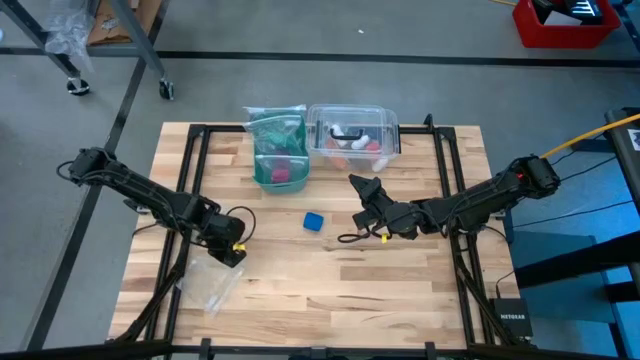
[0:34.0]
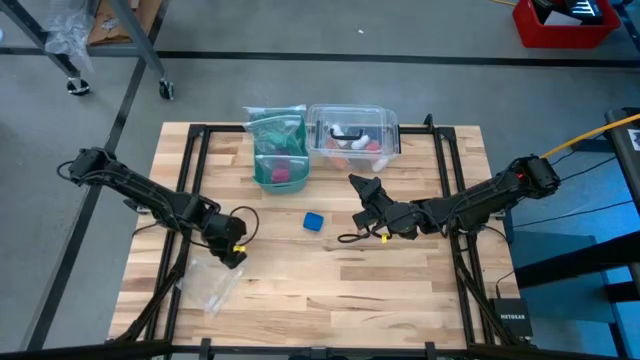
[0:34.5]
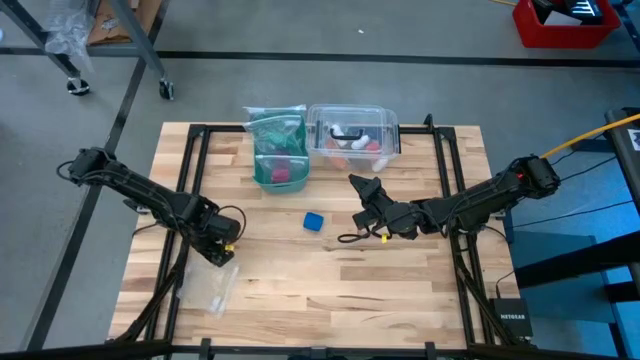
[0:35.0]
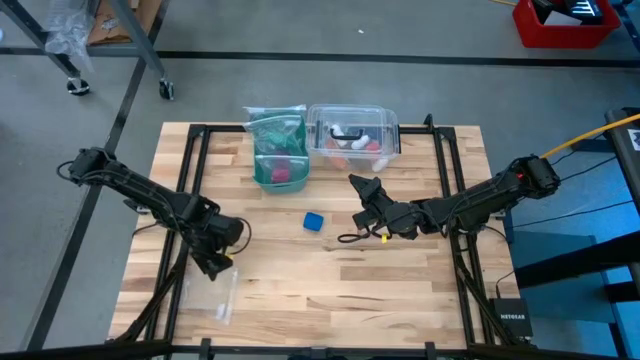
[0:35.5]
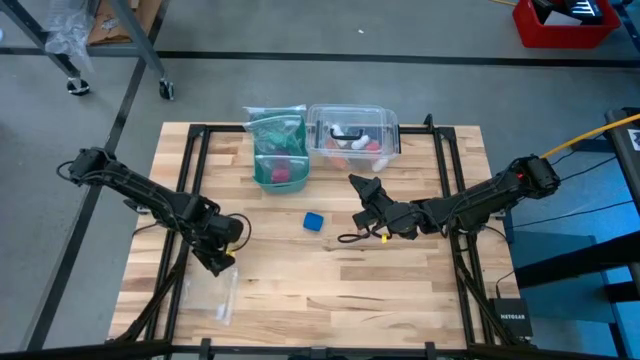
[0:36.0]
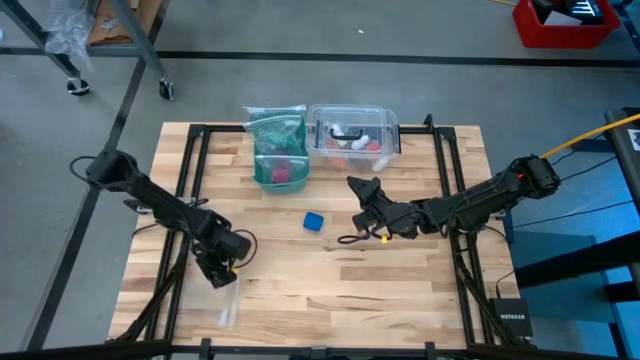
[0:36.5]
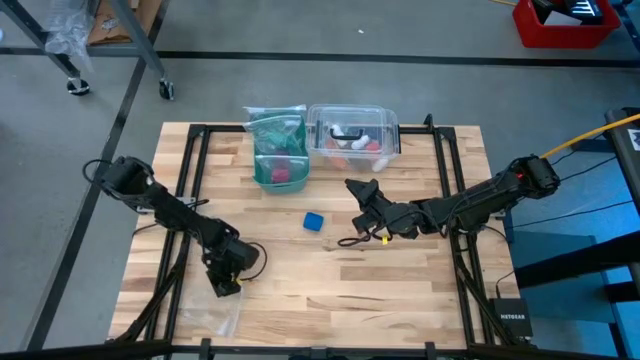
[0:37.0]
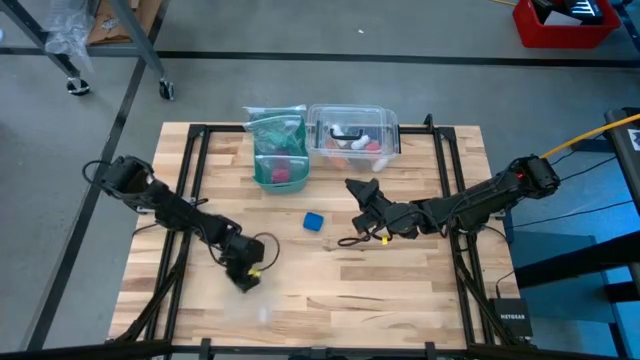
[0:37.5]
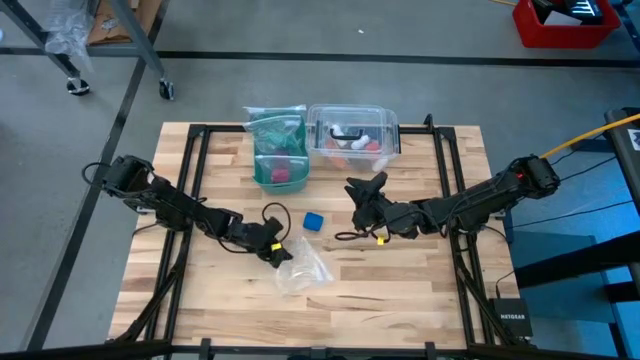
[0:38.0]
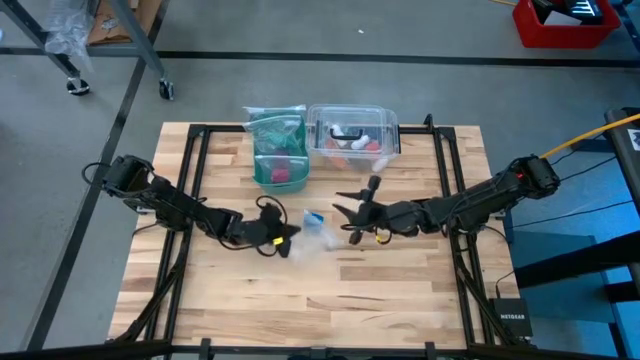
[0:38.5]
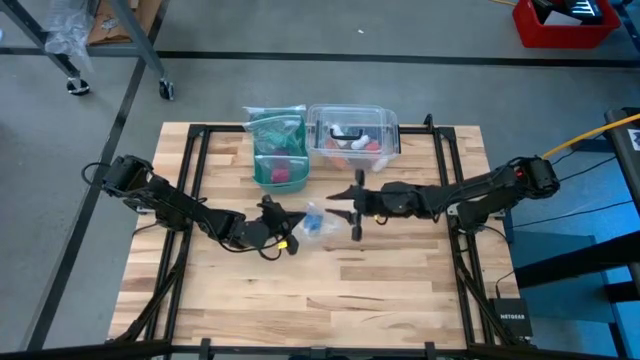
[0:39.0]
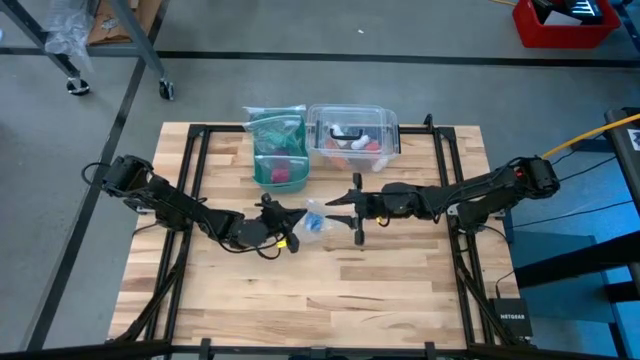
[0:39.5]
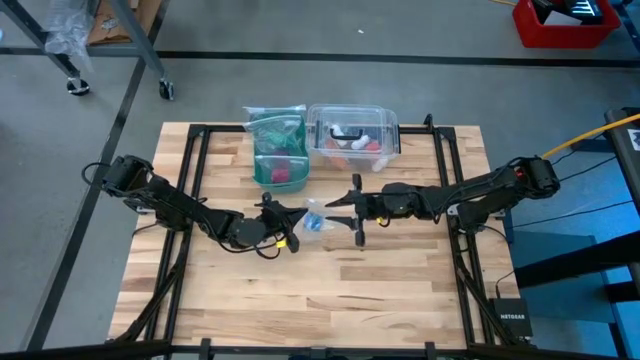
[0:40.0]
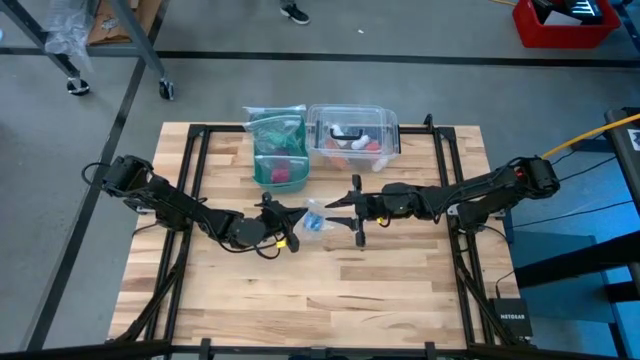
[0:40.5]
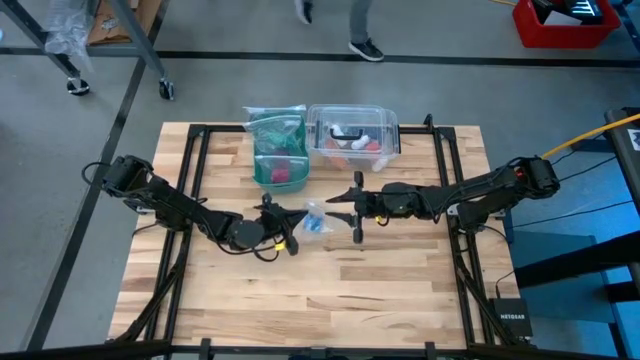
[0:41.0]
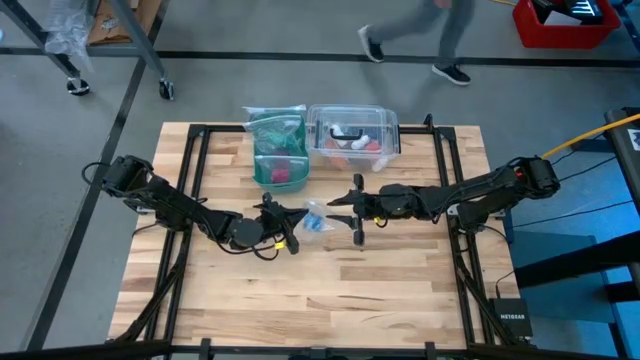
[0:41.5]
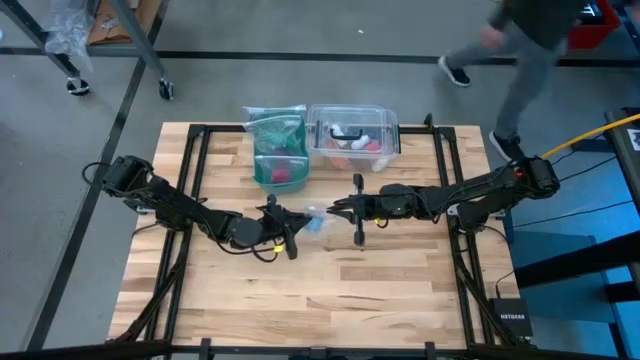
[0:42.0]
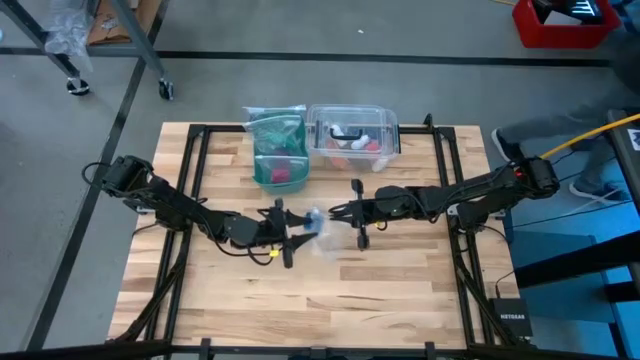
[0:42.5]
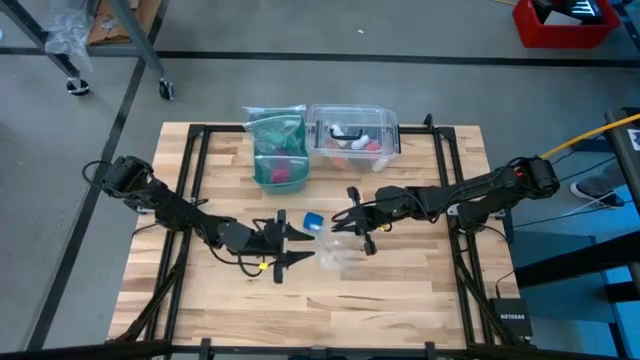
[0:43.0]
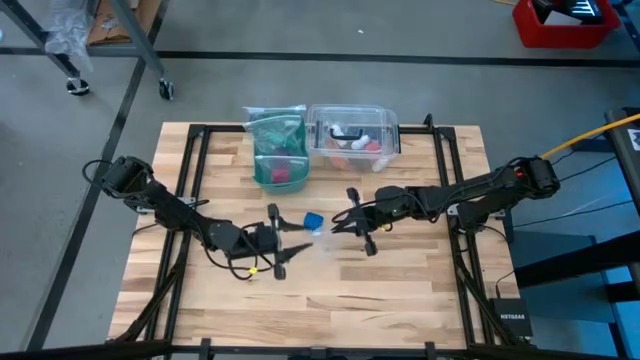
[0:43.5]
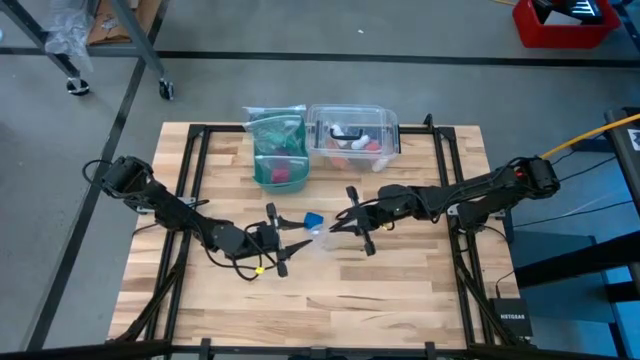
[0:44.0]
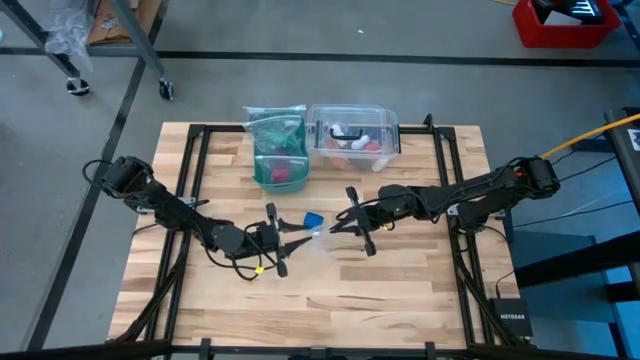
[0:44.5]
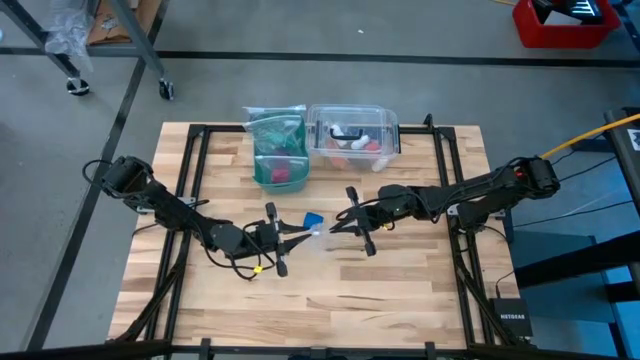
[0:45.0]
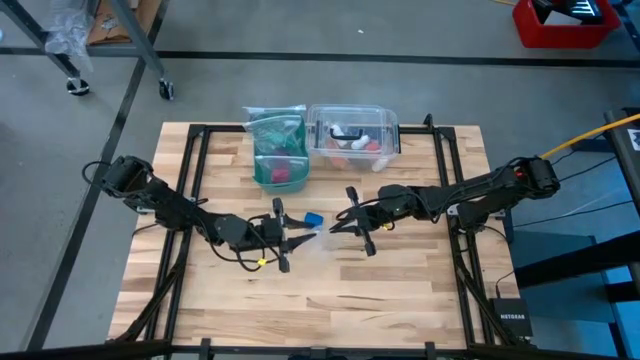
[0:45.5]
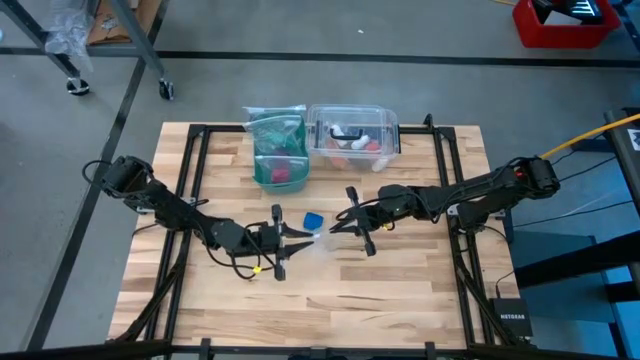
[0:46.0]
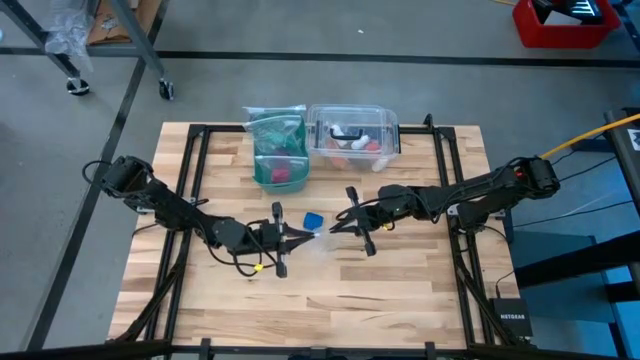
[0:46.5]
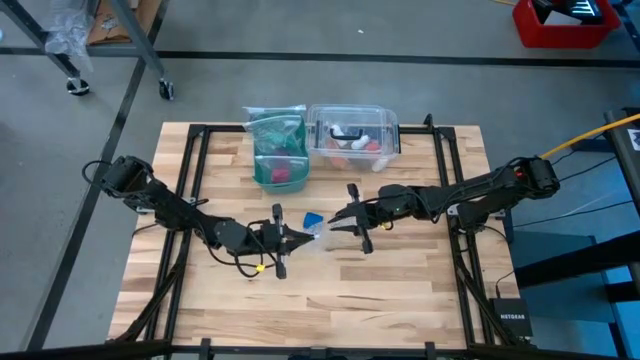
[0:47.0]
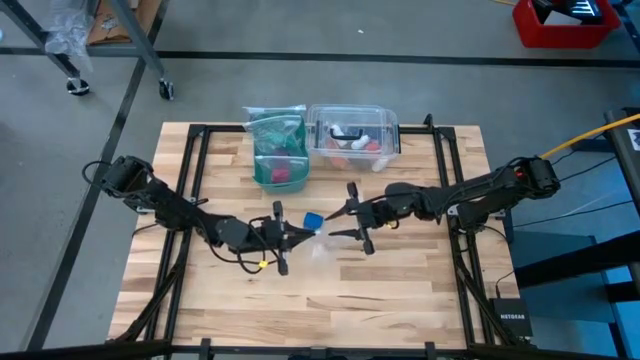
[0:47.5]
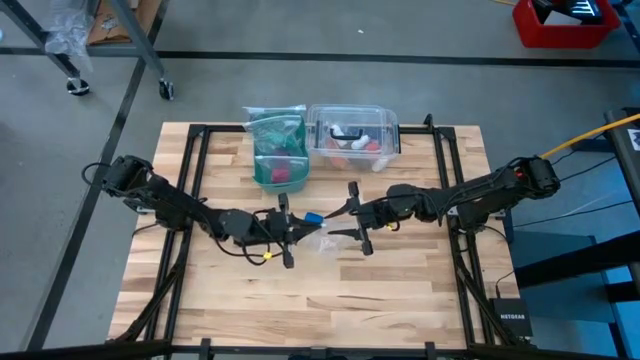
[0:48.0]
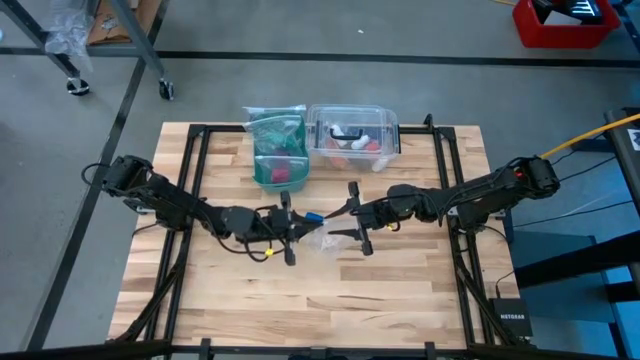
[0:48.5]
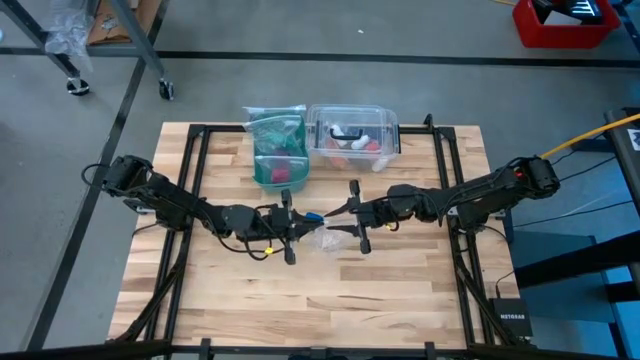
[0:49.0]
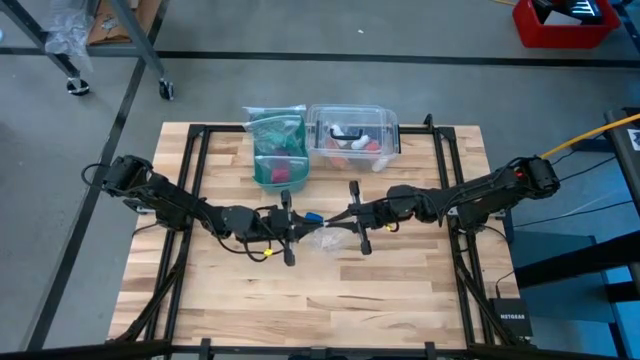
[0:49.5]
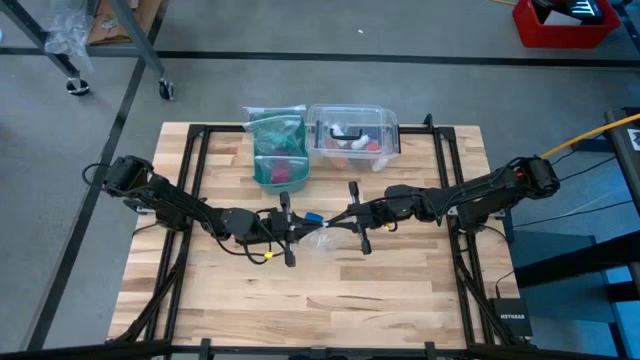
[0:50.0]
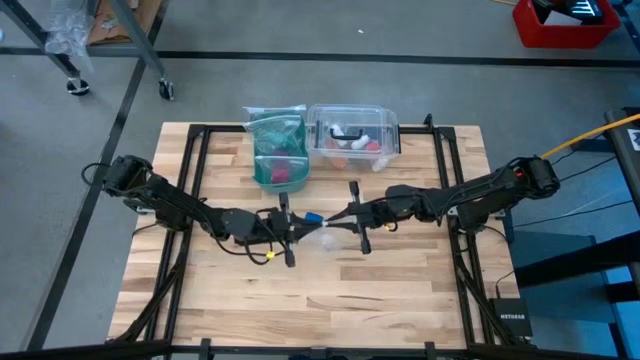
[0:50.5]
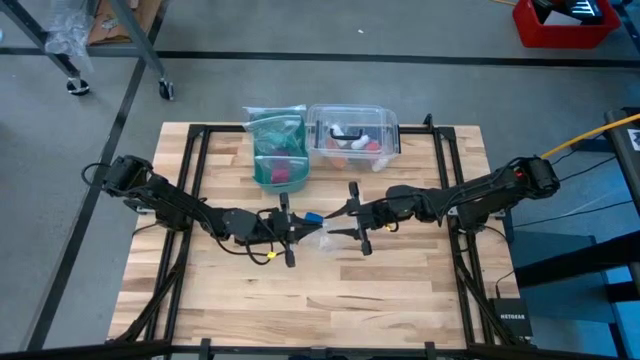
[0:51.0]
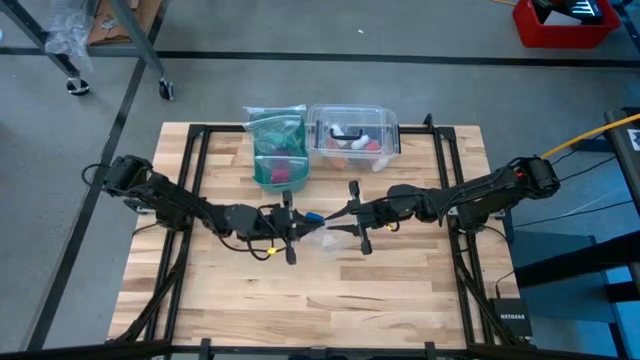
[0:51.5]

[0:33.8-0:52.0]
Task: Roll bandage
Open the transparent zip bag

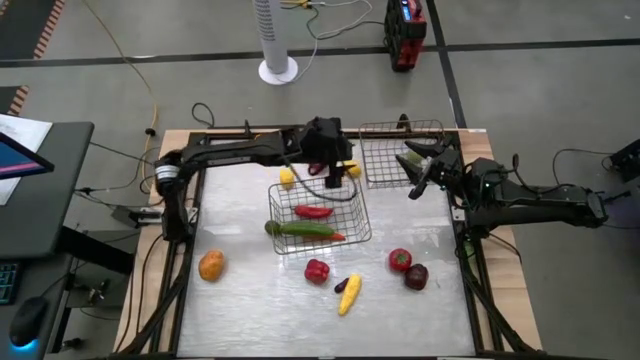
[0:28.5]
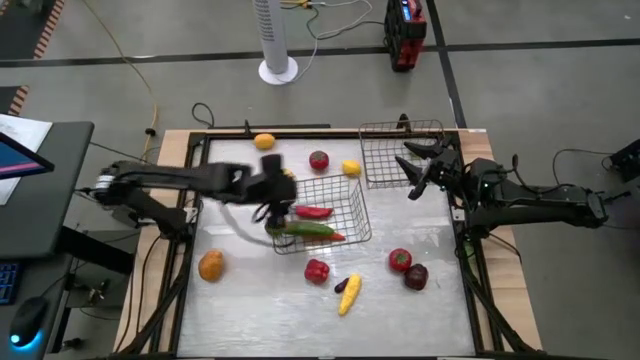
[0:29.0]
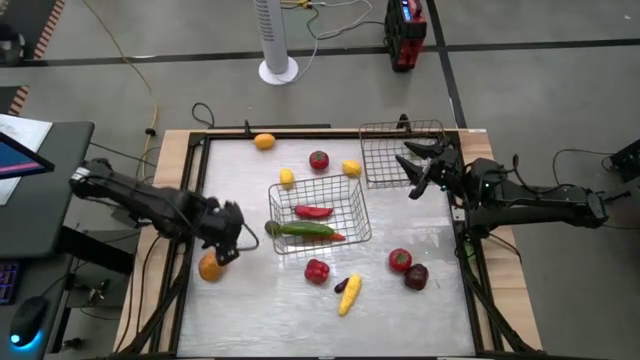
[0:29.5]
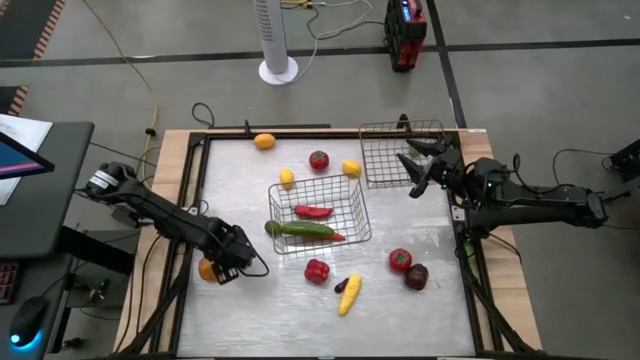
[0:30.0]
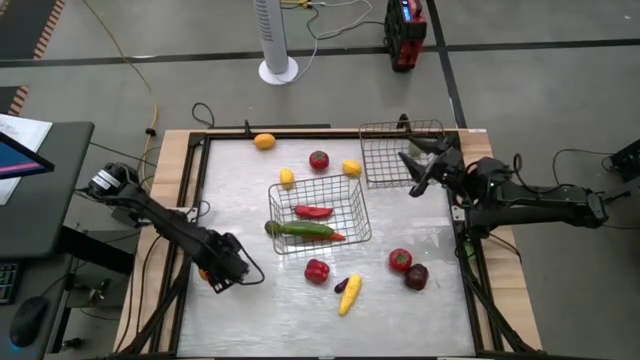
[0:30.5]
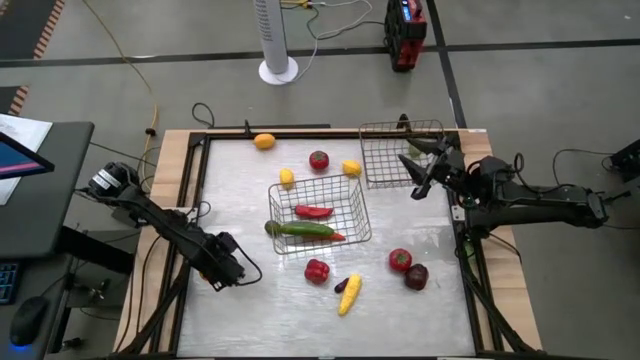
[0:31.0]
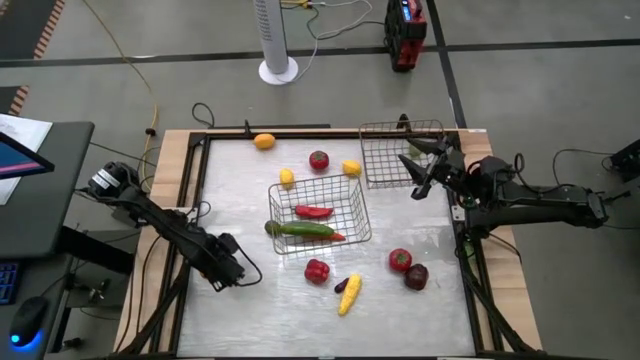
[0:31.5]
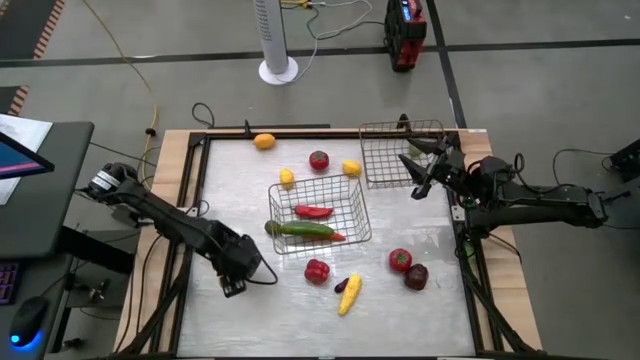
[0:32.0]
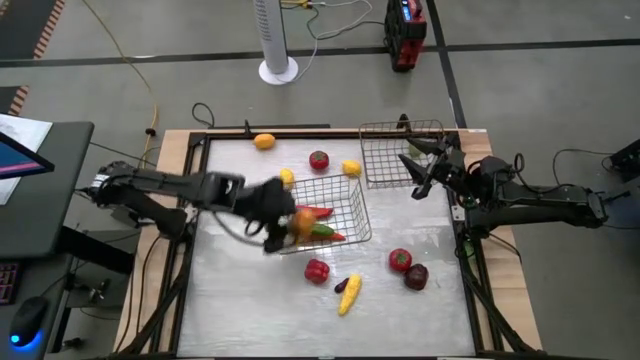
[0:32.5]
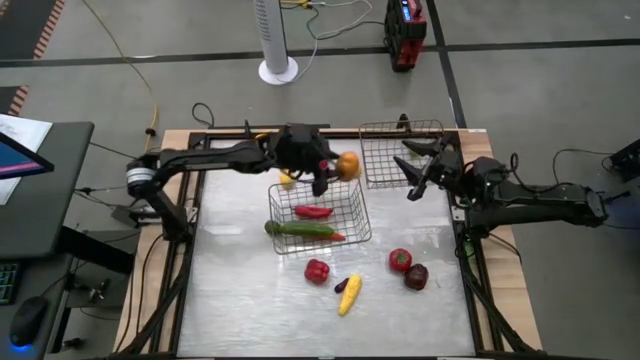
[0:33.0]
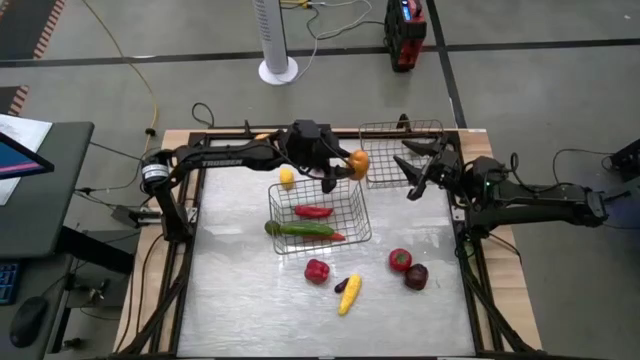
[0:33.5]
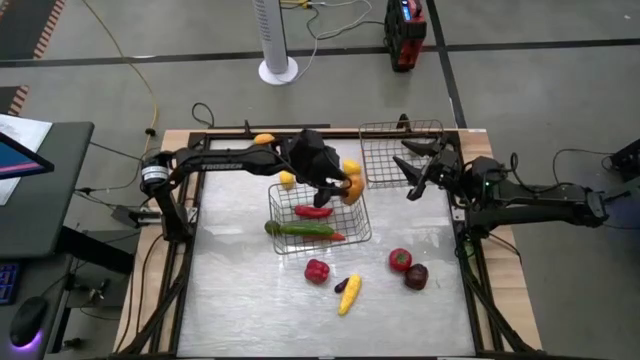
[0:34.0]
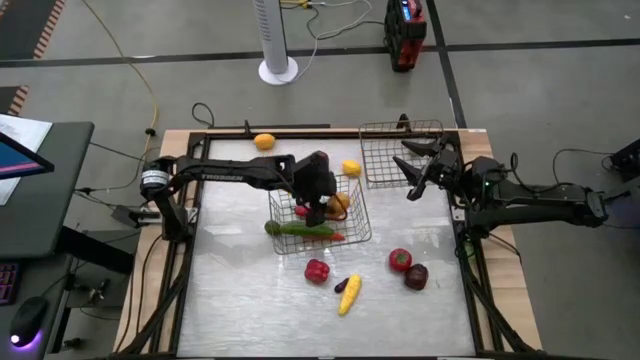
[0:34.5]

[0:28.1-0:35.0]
Task: Sort produce into baskets
Put the brown potato into the left wire basket
